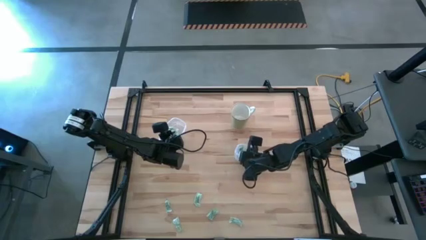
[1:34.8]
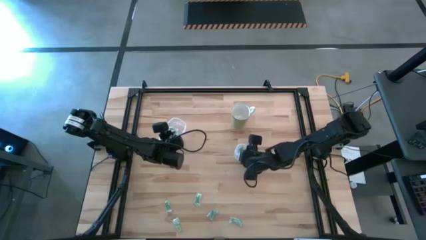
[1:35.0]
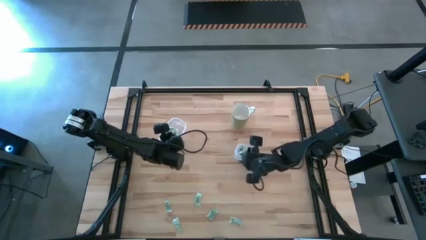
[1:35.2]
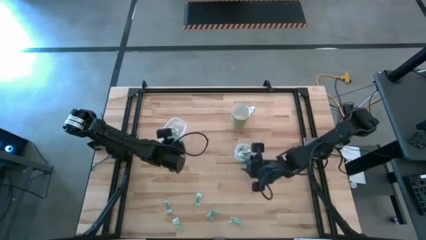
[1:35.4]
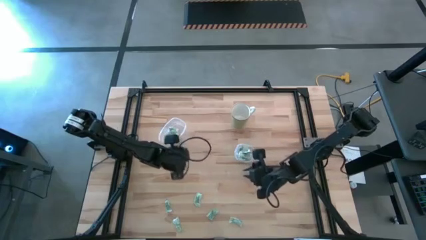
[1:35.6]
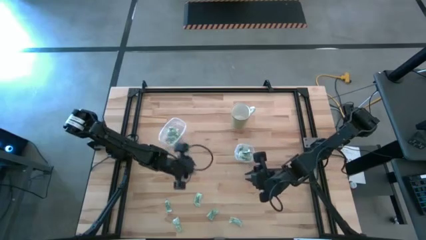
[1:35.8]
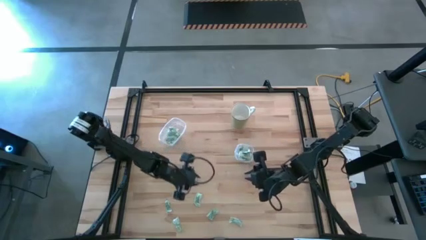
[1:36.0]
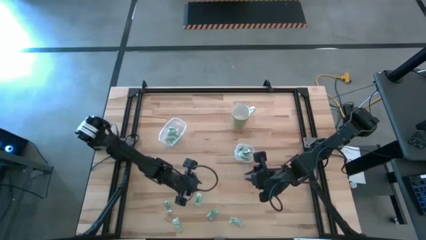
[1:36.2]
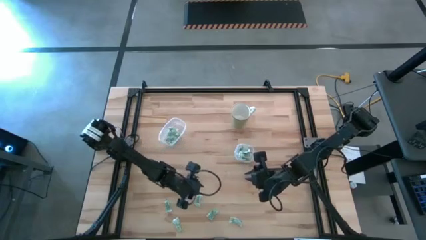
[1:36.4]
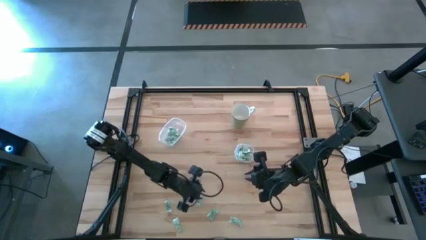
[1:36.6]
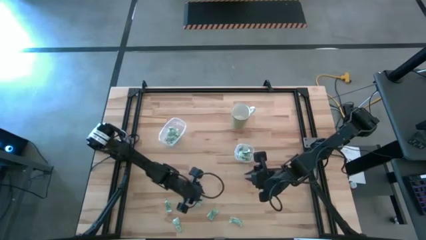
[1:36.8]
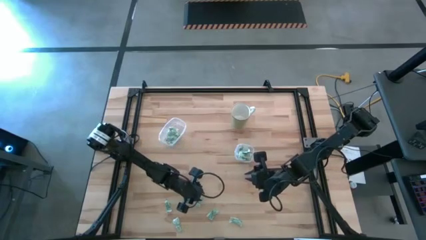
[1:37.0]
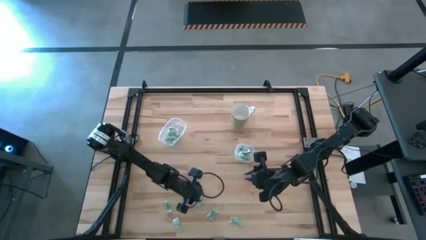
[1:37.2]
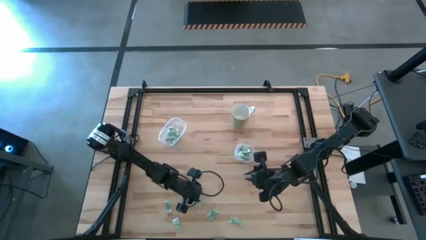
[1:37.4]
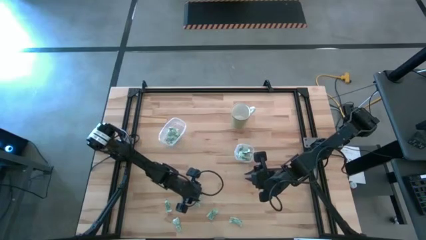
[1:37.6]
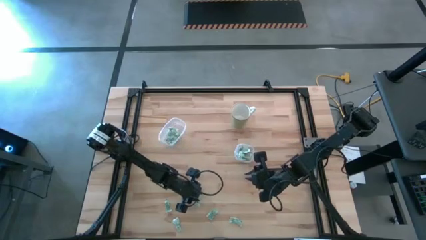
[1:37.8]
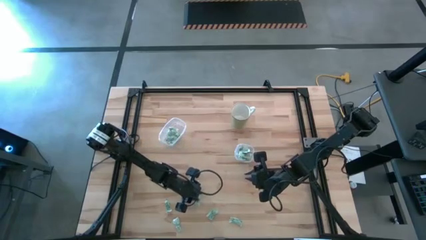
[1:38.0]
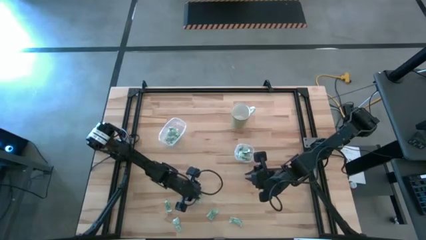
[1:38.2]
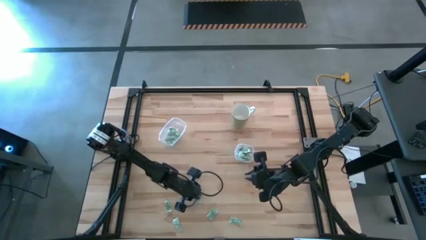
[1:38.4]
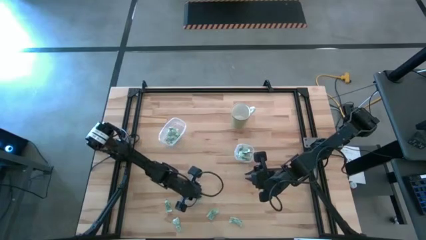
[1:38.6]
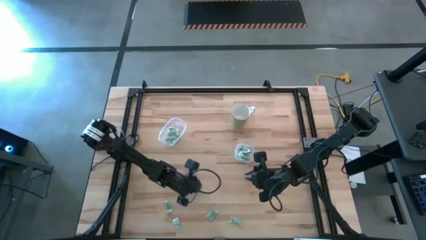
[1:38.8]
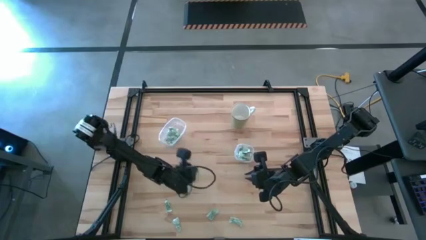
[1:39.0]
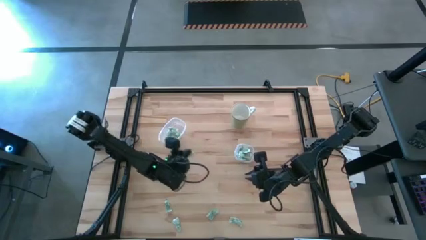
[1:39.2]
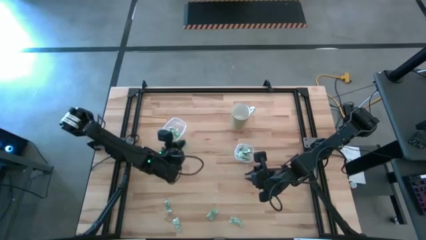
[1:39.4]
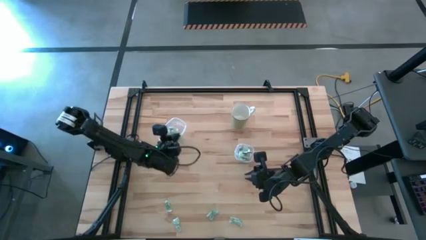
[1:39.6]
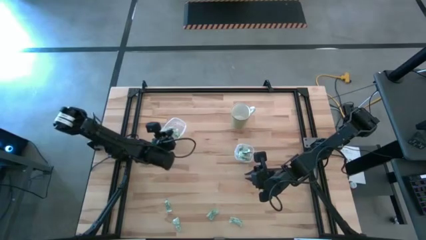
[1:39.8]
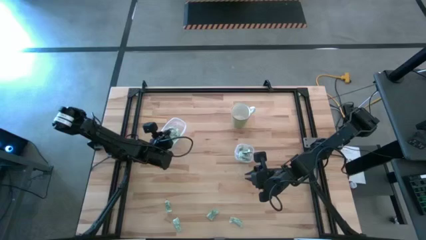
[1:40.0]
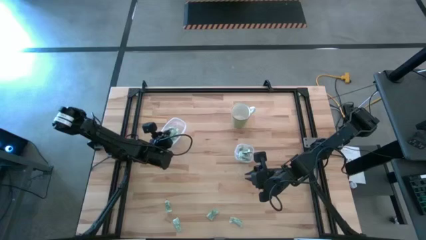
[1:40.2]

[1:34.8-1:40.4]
Task: Pick and place Stevia / Truvia into bins
Put the stevia packet into the left transparent container

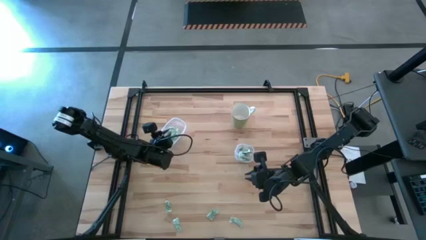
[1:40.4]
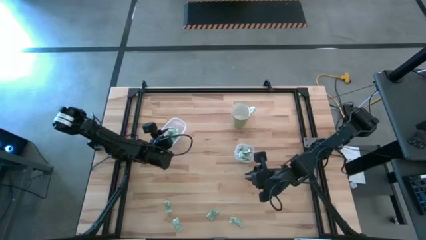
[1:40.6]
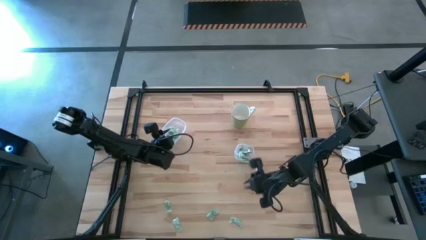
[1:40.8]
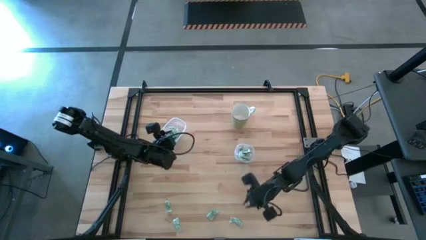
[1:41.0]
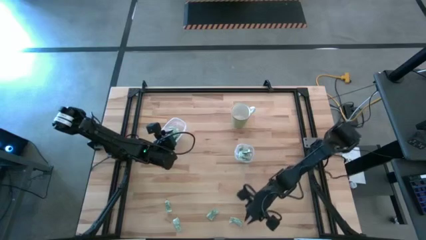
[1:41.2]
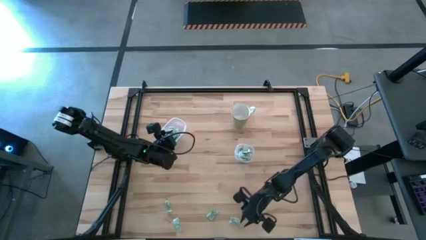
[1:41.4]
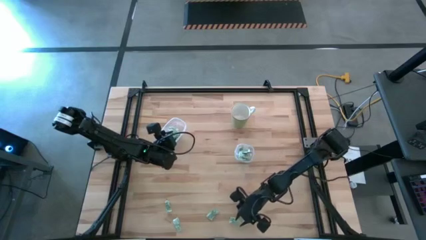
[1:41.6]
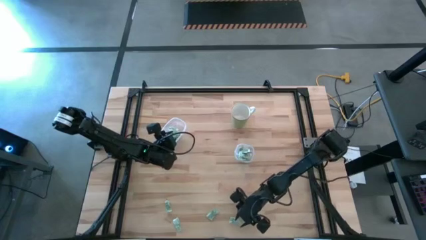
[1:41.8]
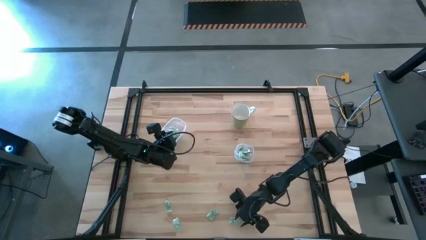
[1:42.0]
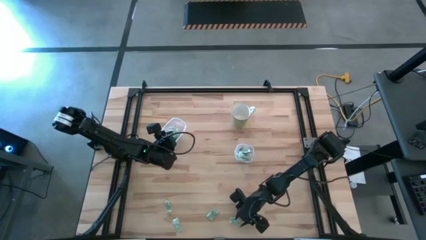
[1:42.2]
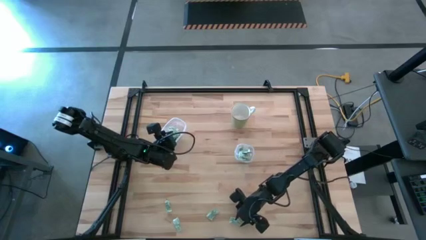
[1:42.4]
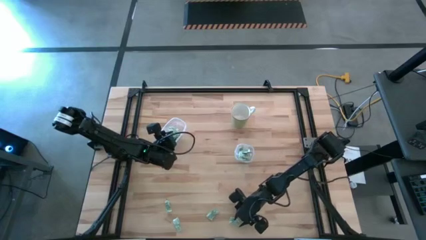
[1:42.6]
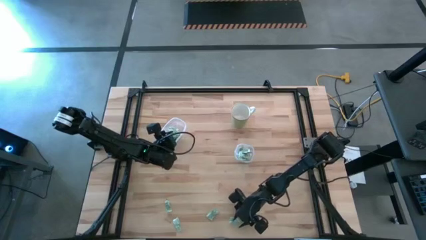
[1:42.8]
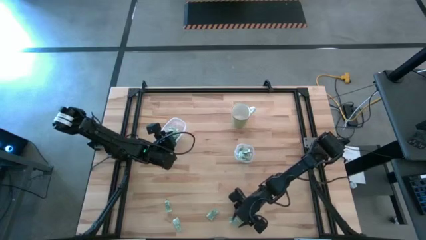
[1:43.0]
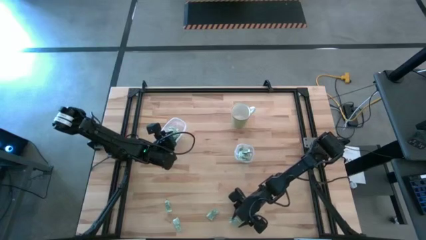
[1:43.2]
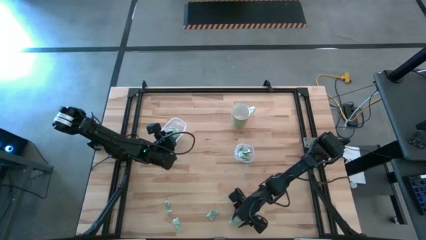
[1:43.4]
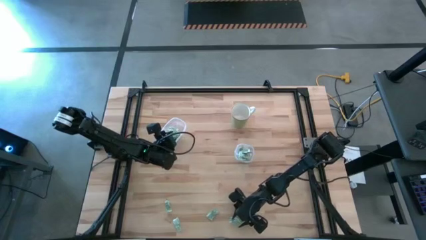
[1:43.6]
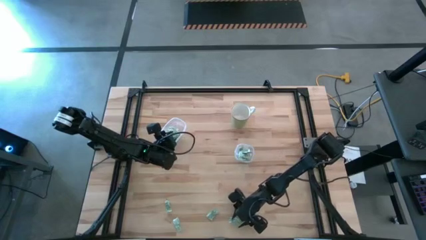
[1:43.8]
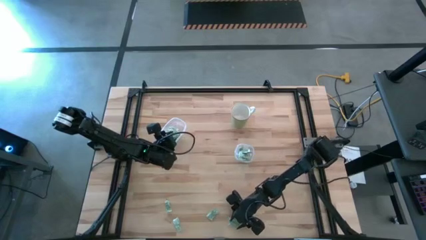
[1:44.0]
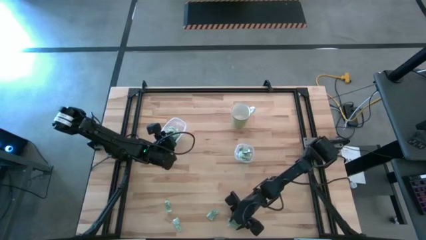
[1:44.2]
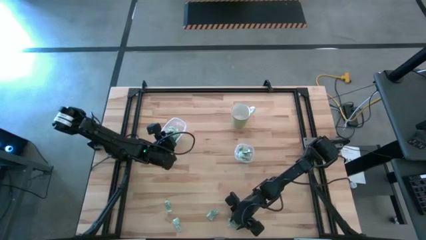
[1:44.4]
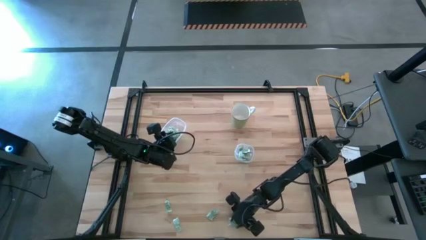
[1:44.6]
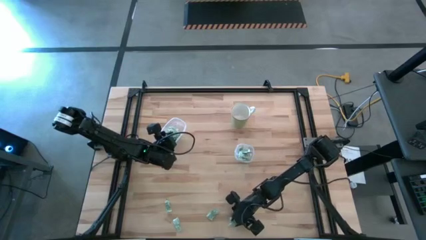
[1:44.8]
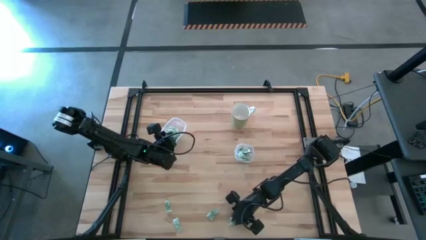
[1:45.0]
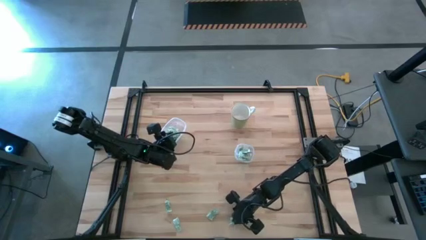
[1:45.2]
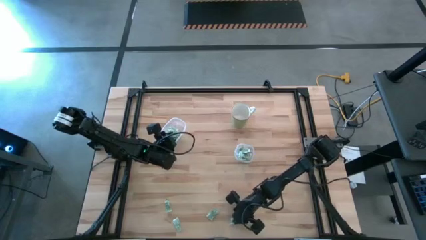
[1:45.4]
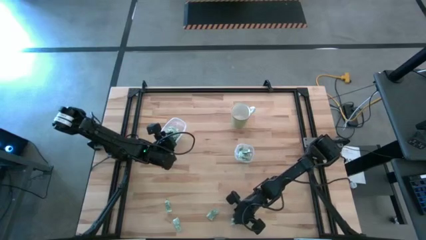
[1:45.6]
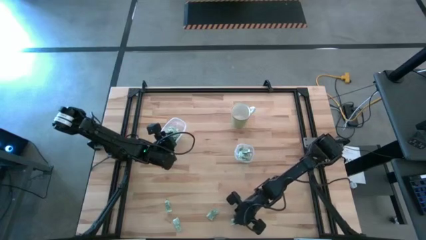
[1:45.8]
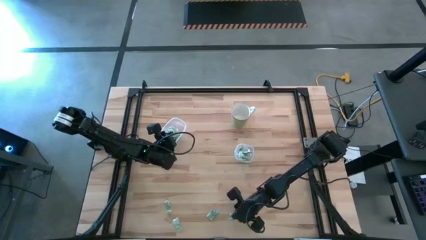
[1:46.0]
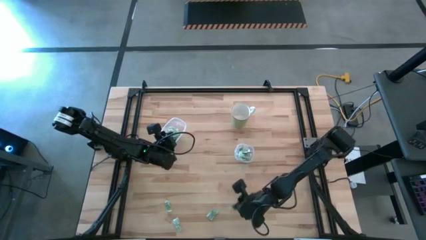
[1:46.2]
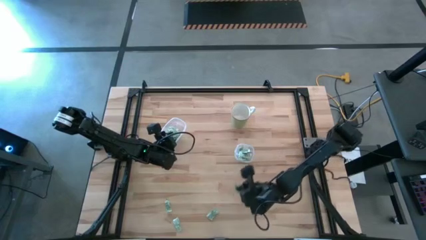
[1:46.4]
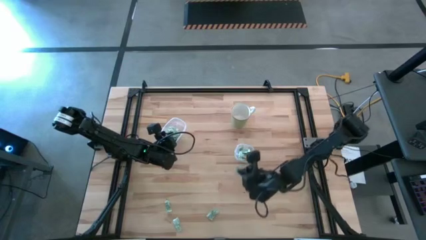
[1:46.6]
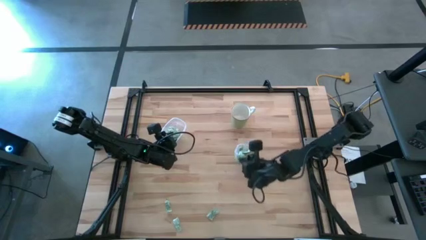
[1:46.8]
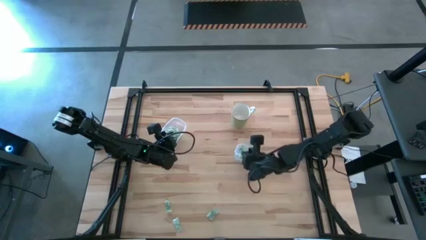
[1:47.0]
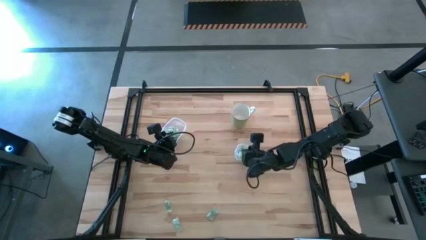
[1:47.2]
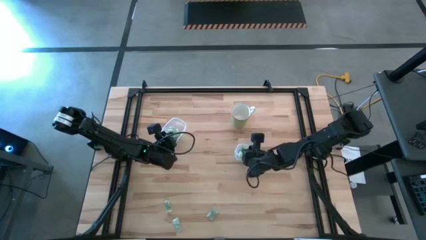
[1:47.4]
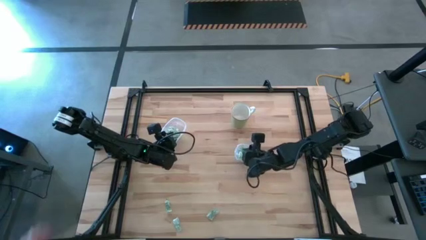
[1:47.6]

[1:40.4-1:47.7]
Put the stevia packet into the right transparent container

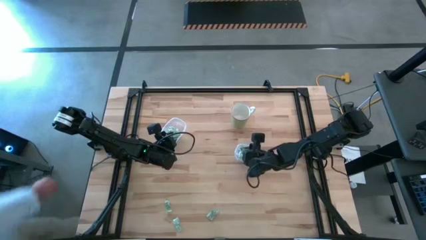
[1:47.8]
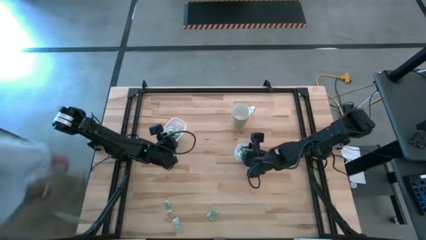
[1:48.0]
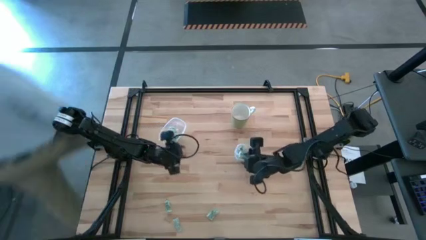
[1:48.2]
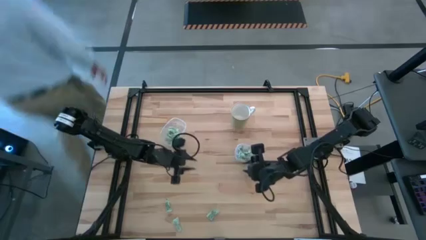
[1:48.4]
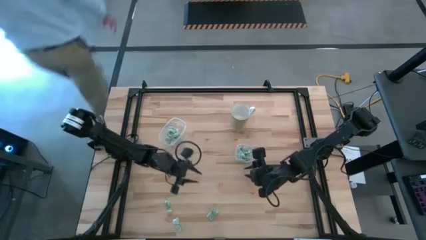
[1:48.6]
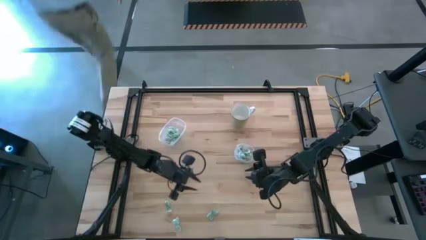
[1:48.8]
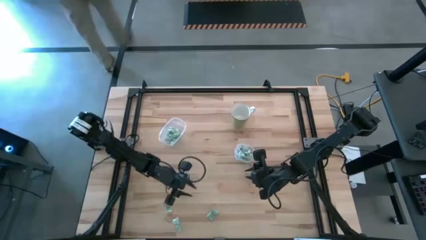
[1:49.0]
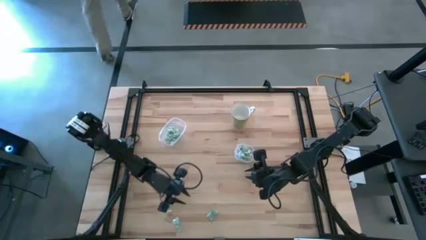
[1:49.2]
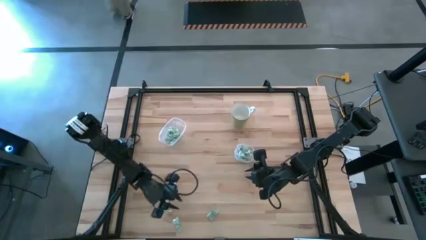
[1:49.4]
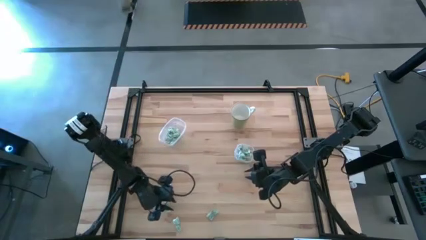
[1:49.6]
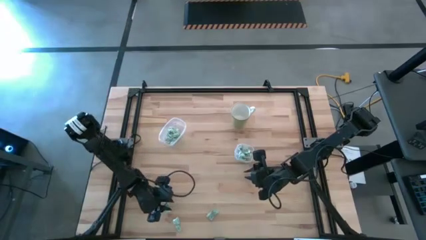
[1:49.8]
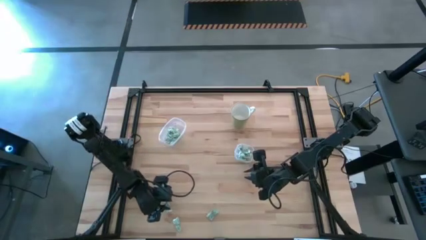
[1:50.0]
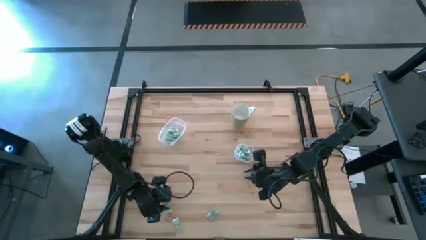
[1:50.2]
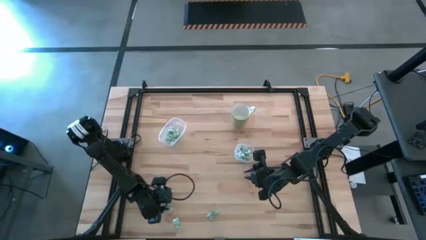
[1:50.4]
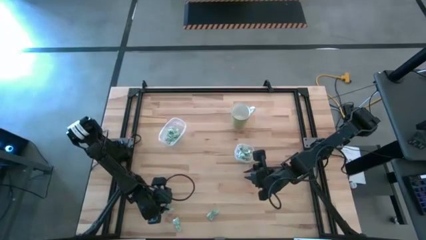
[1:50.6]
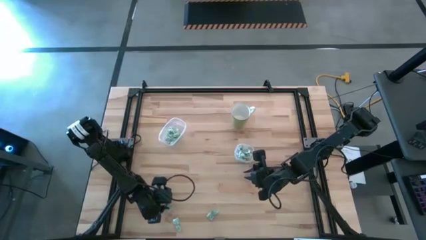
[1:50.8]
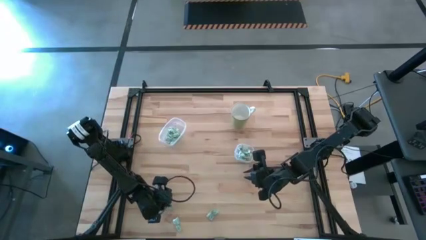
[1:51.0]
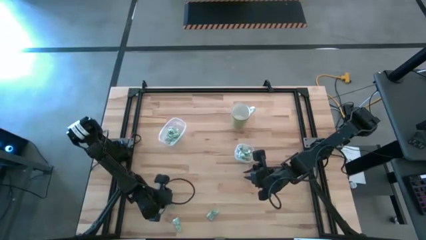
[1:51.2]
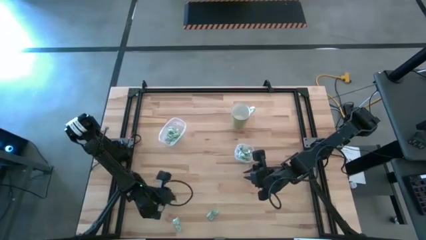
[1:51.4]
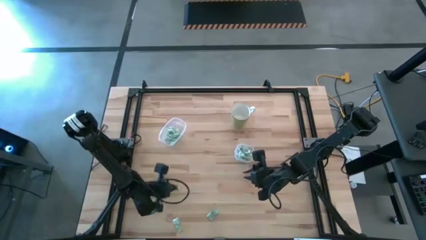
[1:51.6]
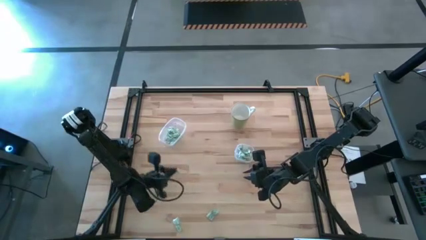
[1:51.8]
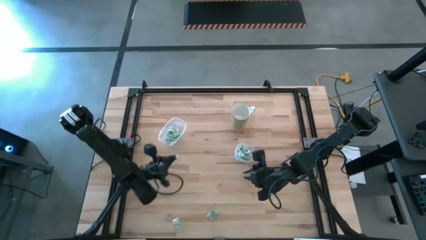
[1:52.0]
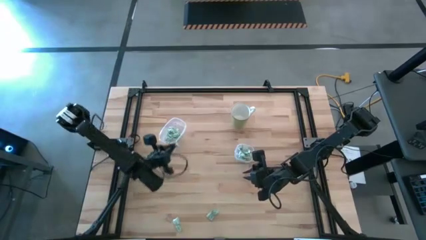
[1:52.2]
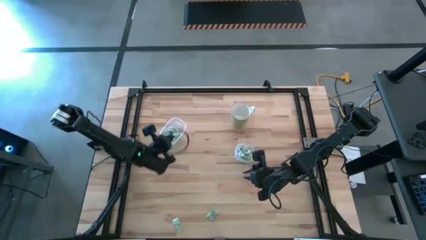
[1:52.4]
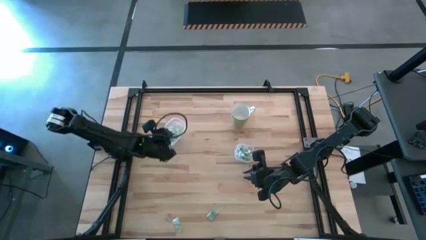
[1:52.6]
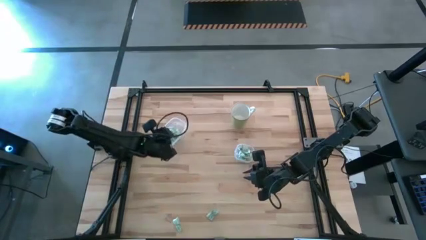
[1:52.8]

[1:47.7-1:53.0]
Put the stevia packet into the left transparent container
